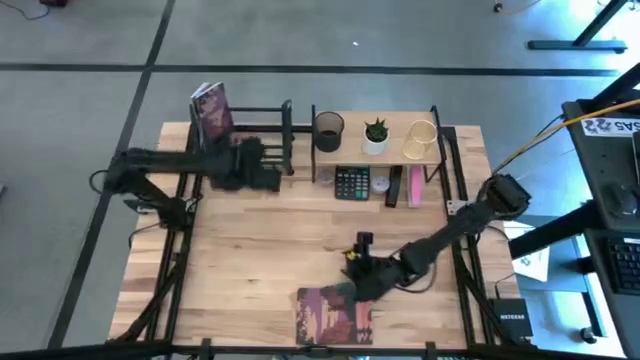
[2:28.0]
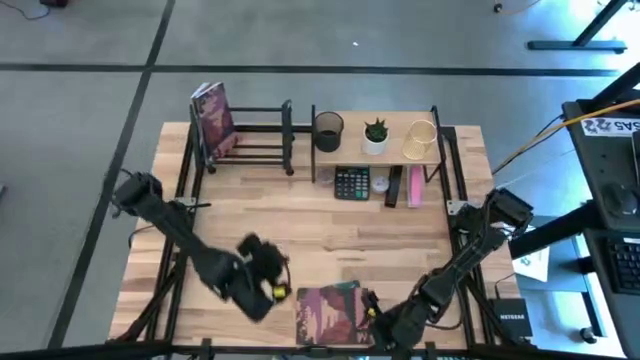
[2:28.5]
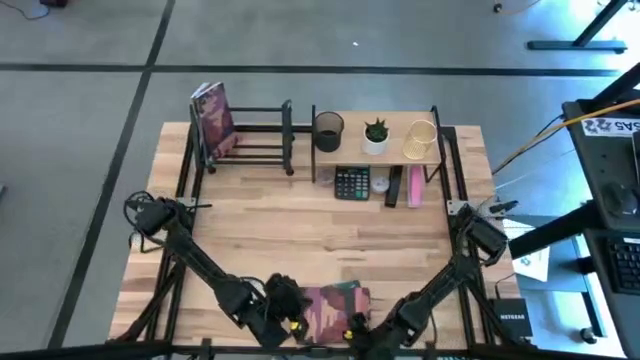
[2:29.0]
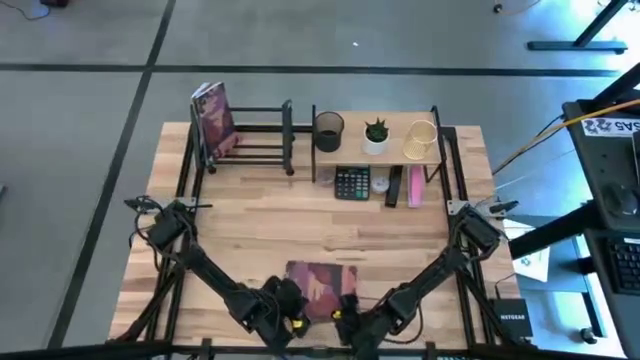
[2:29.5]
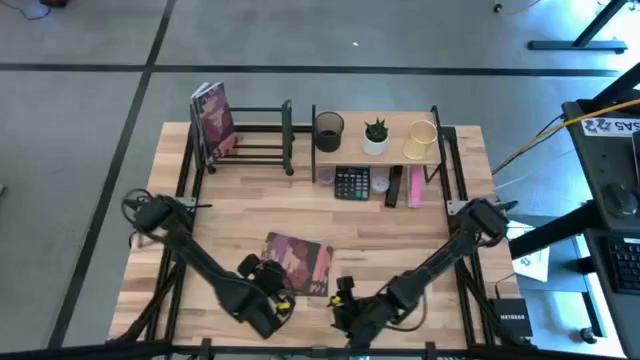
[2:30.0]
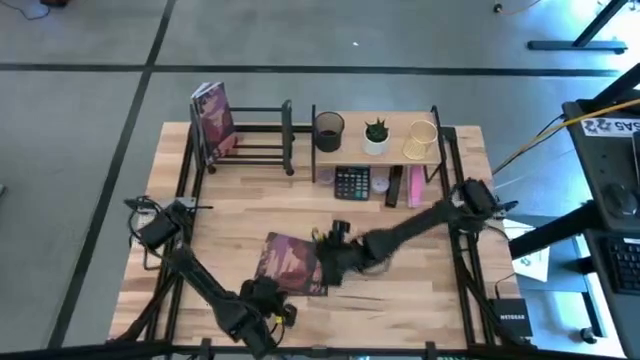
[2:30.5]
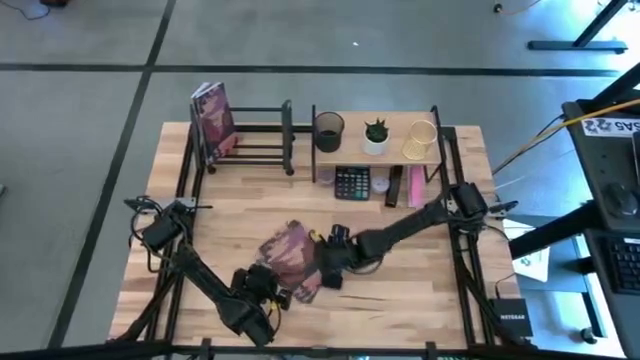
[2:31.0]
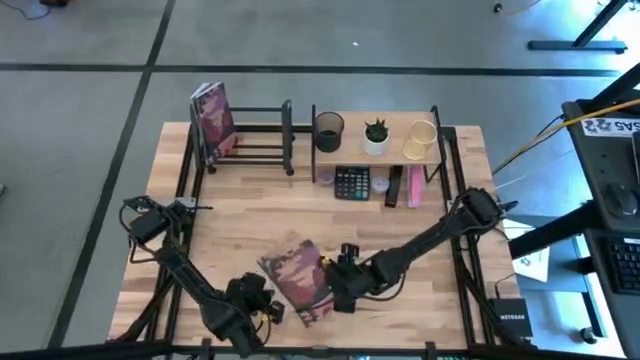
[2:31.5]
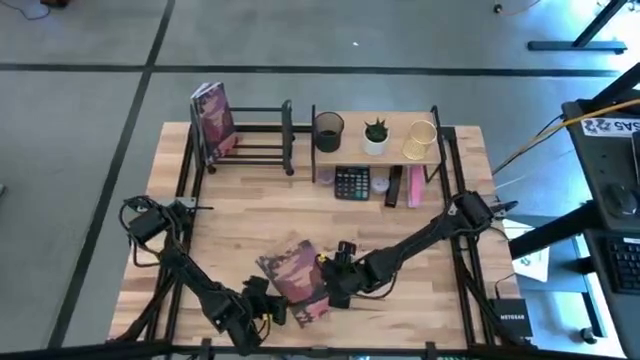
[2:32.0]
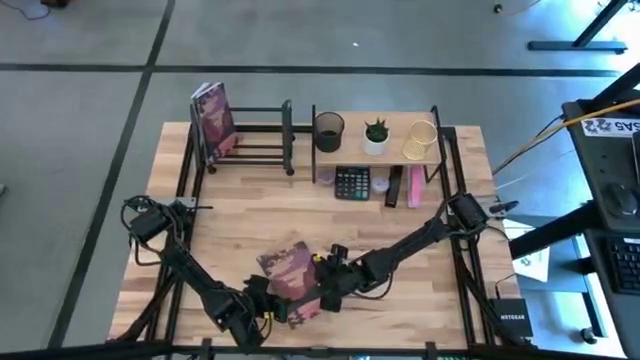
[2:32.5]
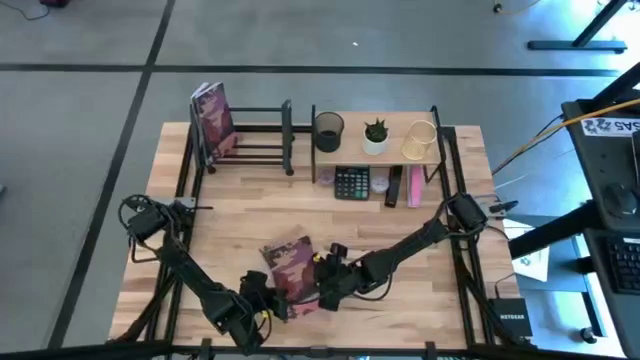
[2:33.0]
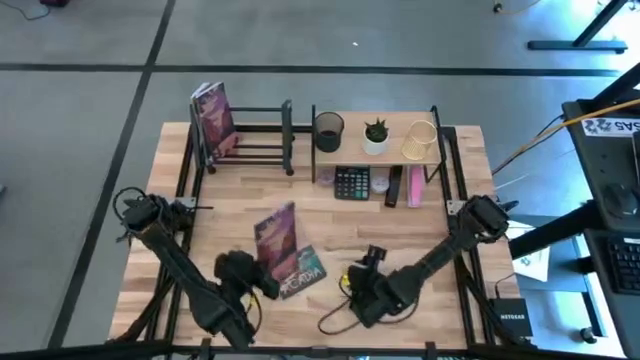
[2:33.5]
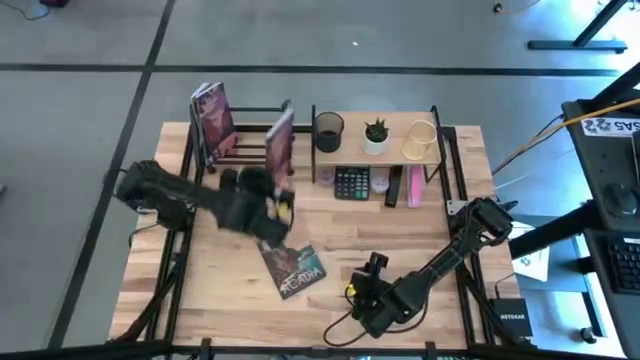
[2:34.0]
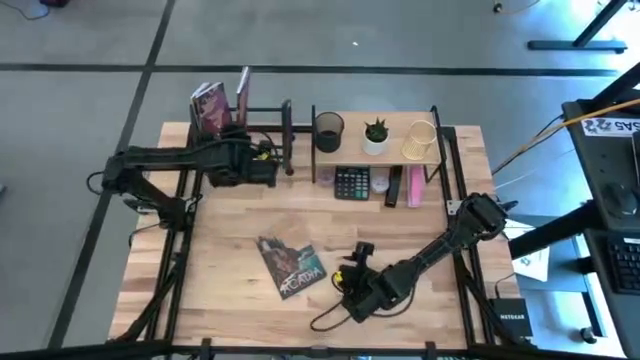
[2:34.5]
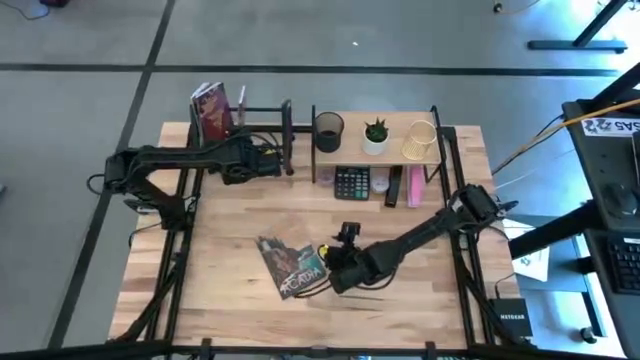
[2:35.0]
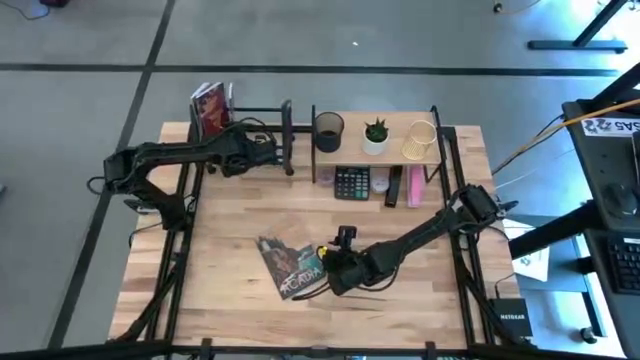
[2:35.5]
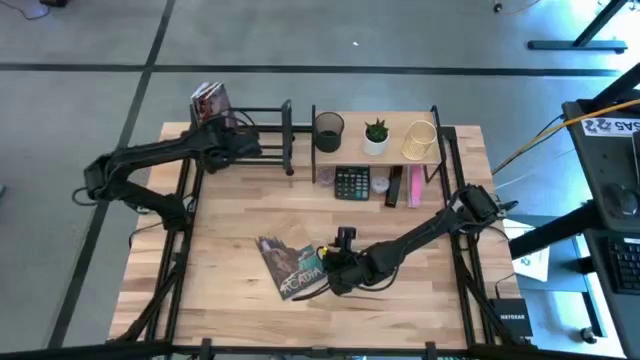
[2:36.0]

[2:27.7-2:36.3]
Task: Stock shelves
Put the red book on the book shelf

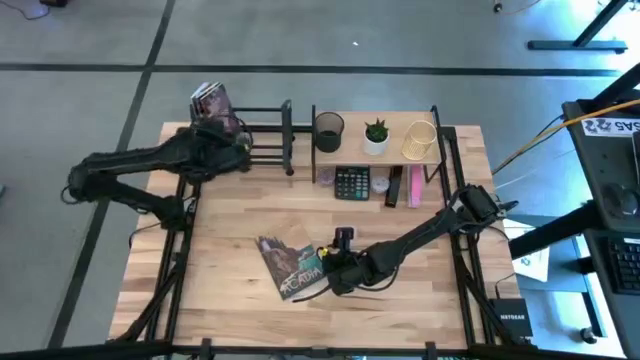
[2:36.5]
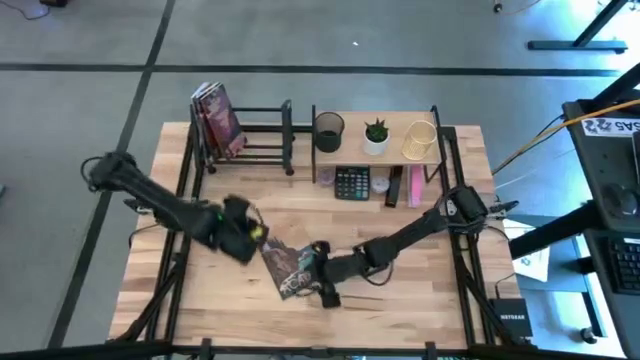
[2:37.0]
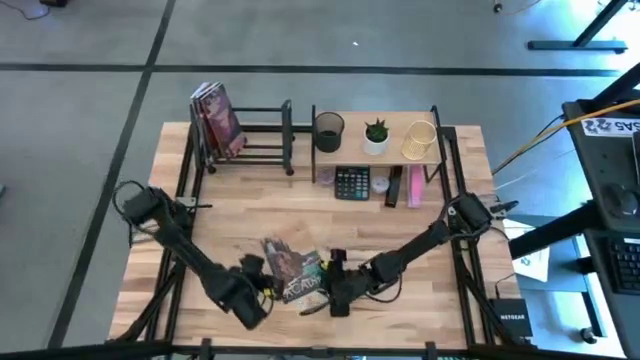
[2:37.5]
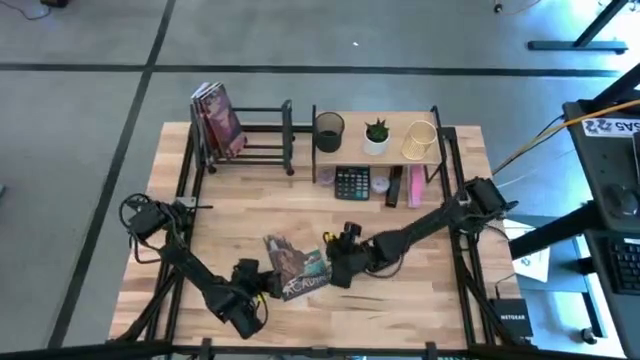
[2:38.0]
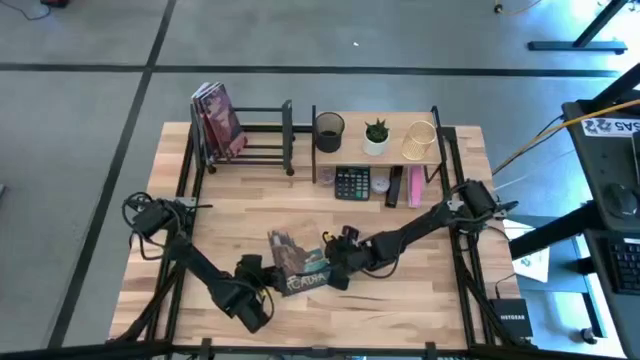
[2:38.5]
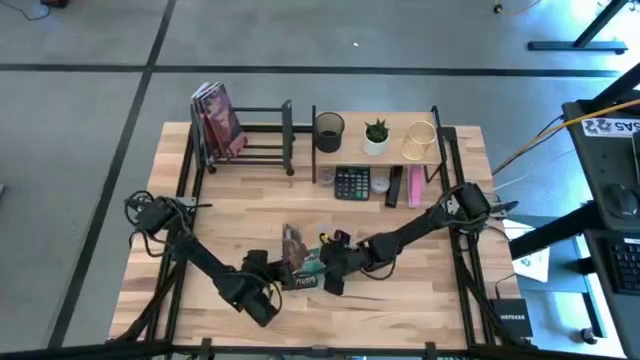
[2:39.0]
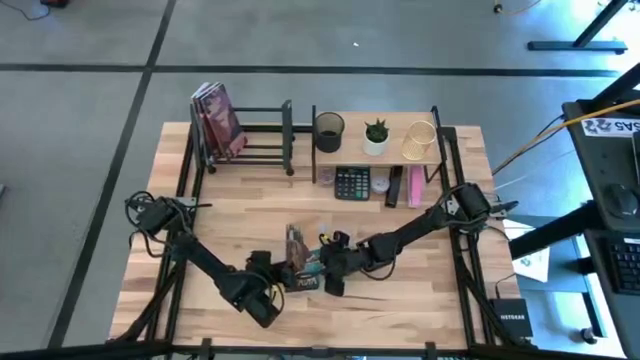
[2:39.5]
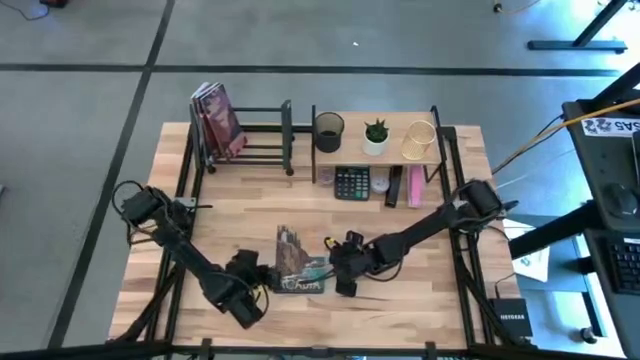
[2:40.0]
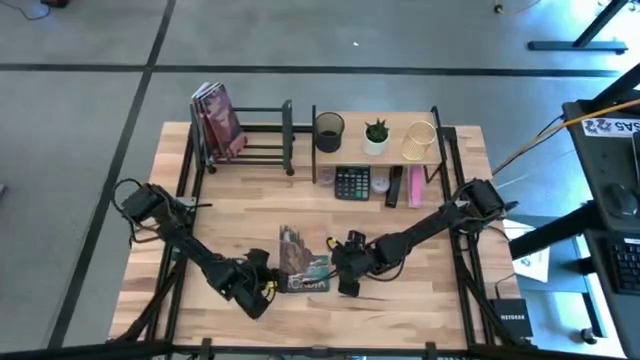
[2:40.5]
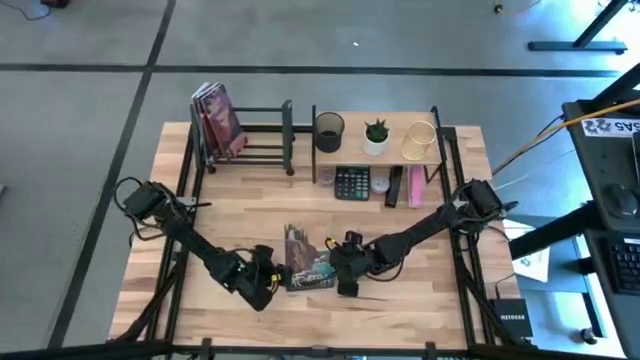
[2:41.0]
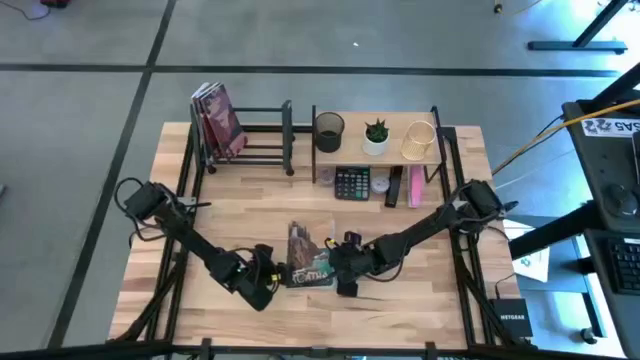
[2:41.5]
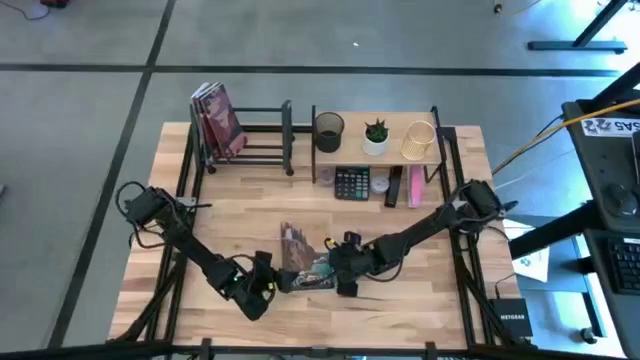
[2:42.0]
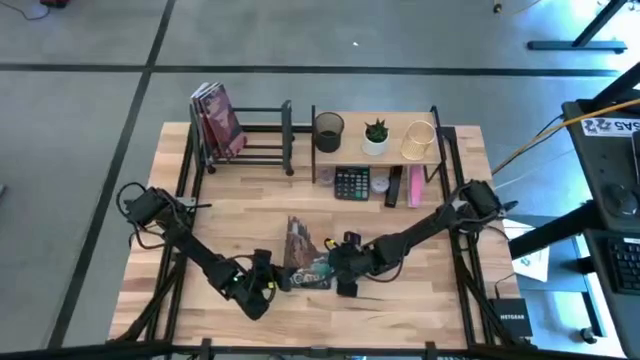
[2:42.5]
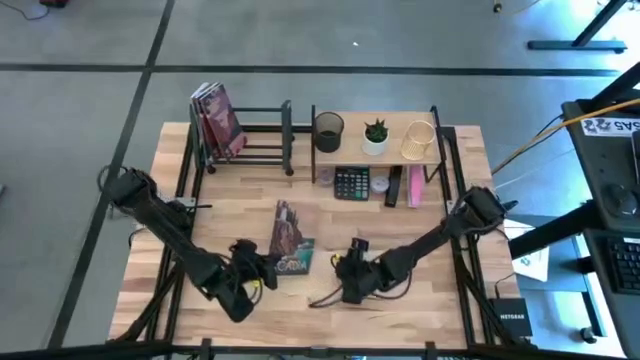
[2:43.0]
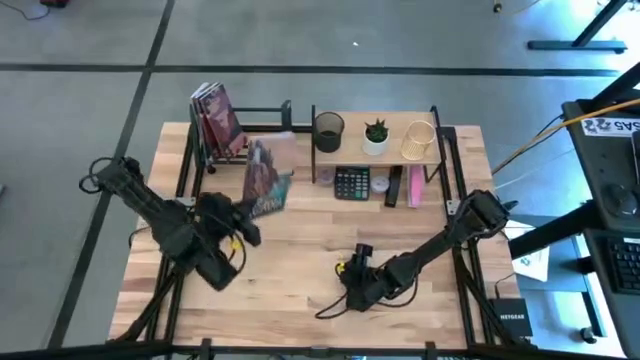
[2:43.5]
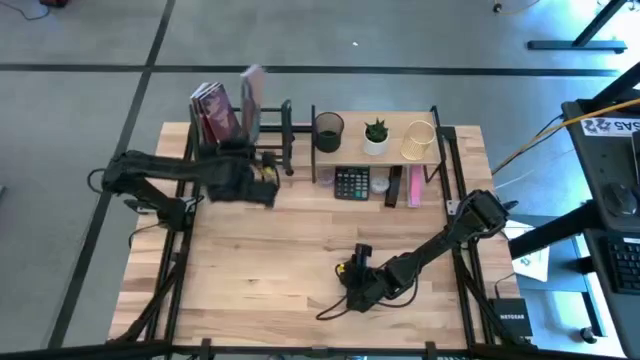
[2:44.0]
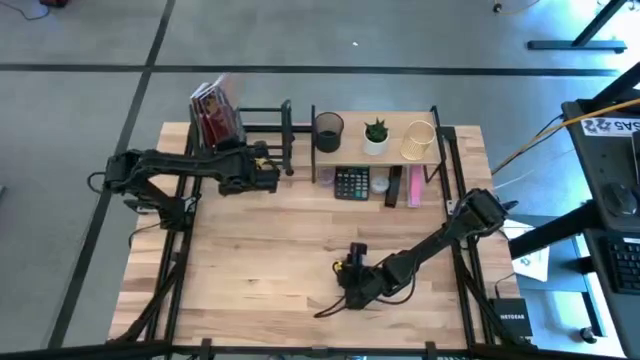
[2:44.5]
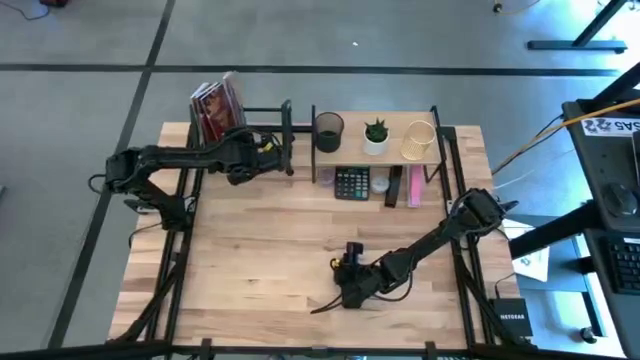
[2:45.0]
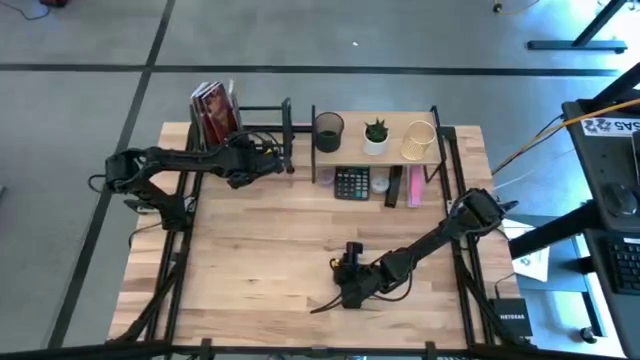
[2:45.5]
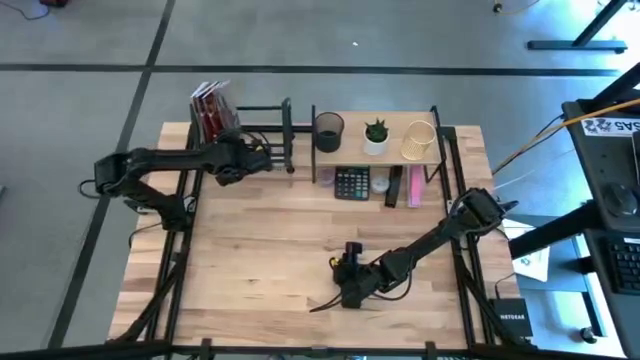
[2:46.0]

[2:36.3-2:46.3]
Put the green book on the book shelf

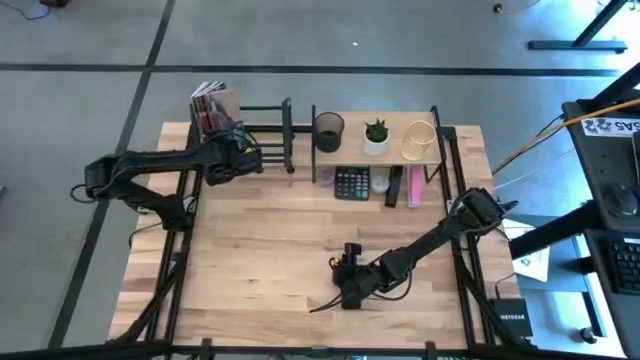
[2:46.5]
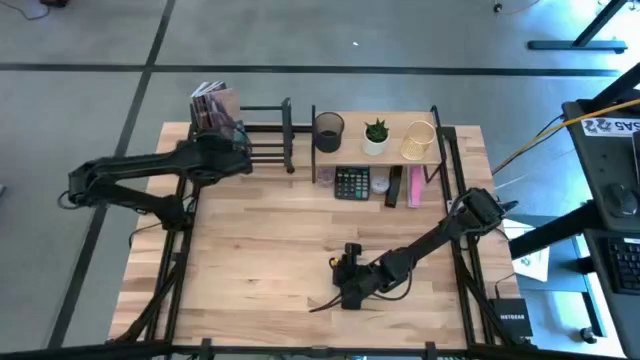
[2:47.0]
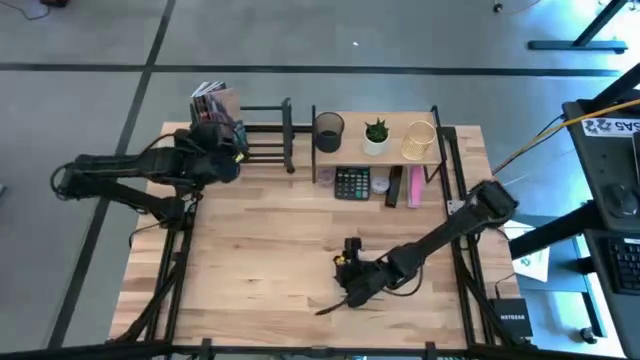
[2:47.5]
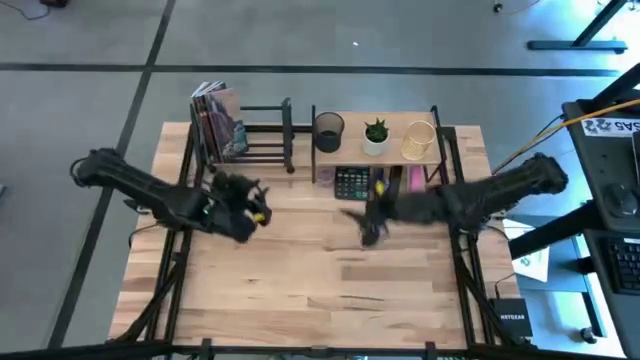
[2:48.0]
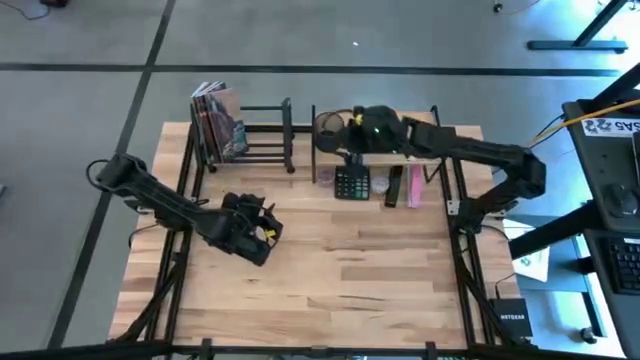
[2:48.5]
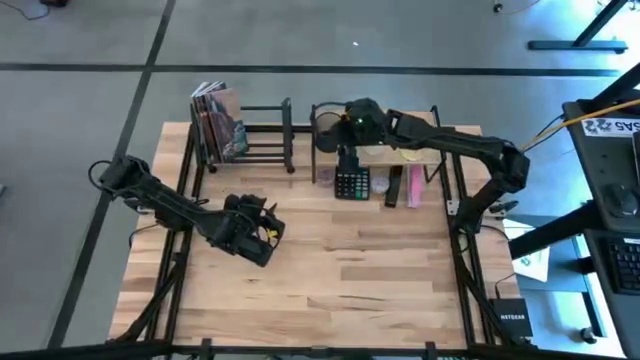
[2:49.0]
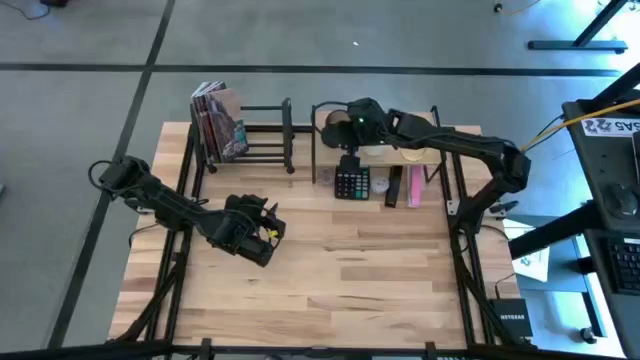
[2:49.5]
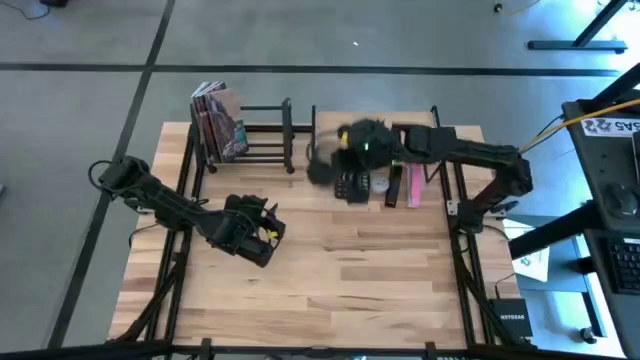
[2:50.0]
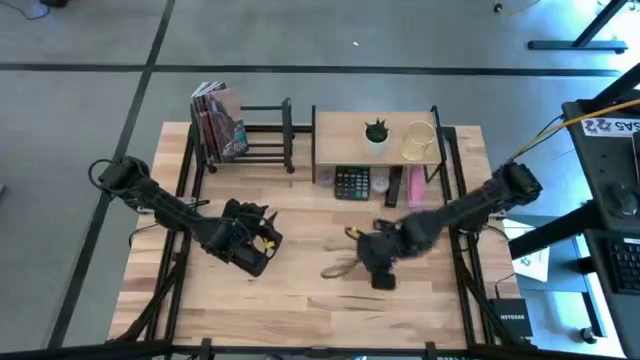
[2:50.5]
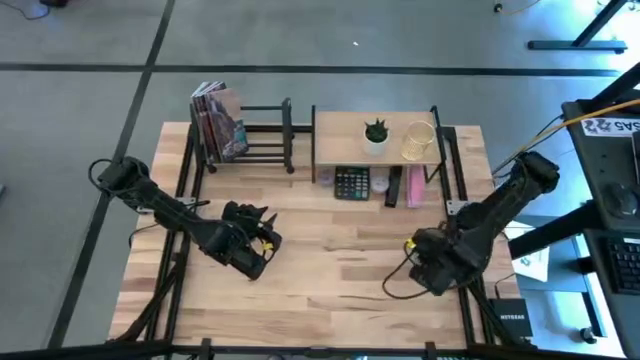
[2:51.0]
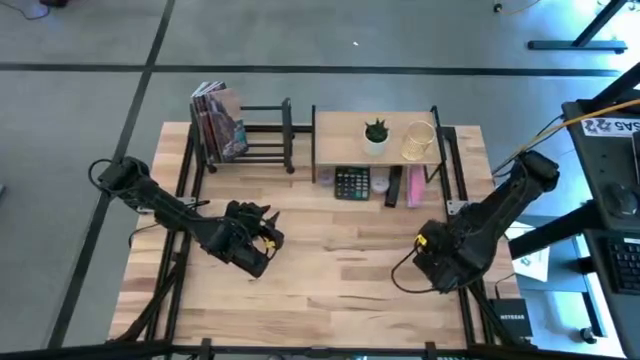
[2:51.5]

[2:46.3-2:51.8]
Remove the black pen organizer from the shelf
